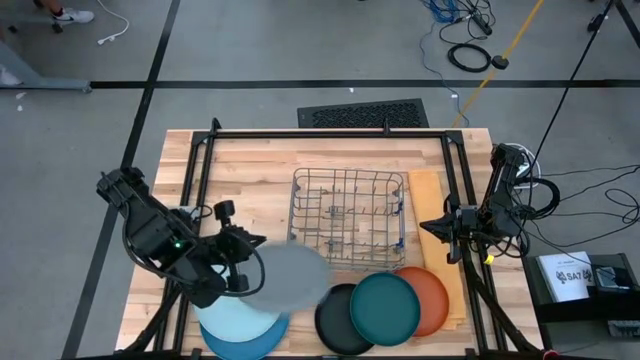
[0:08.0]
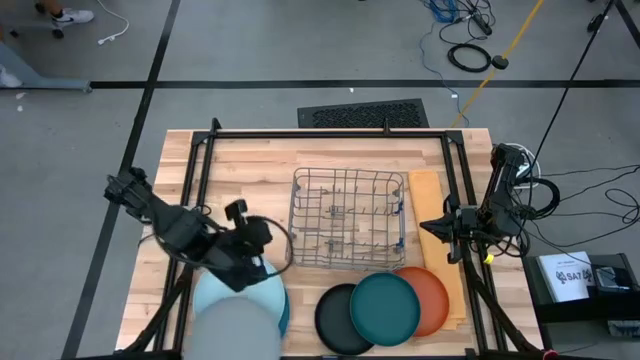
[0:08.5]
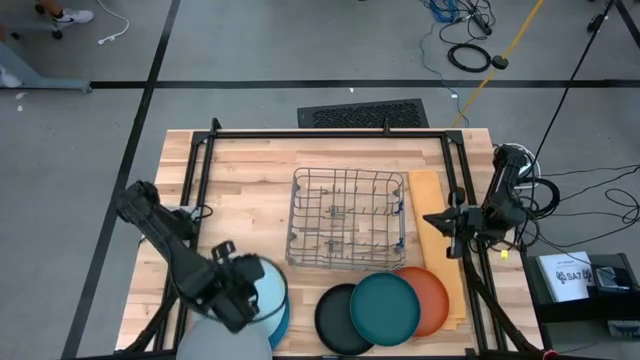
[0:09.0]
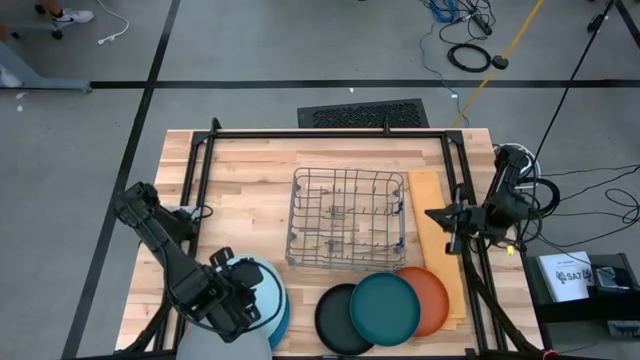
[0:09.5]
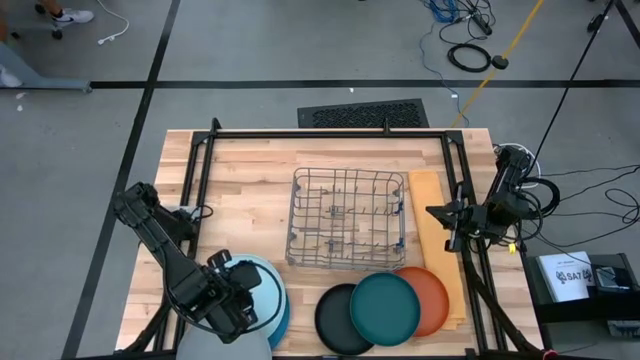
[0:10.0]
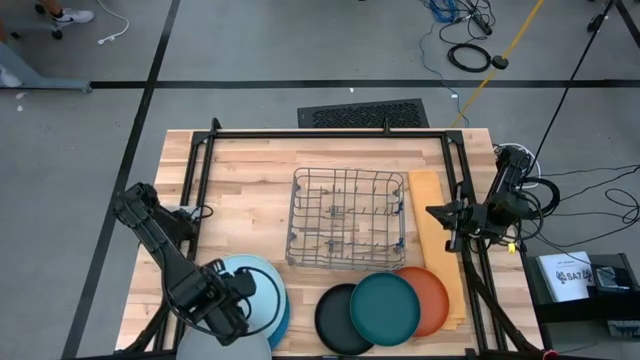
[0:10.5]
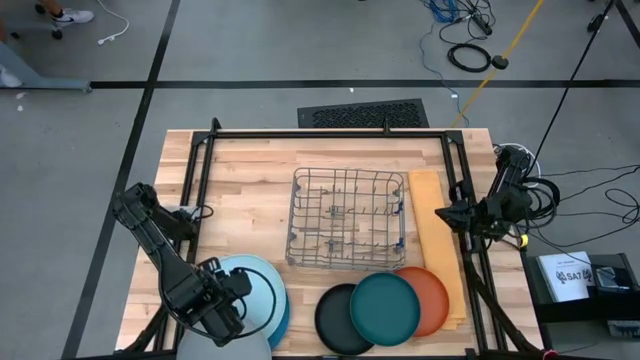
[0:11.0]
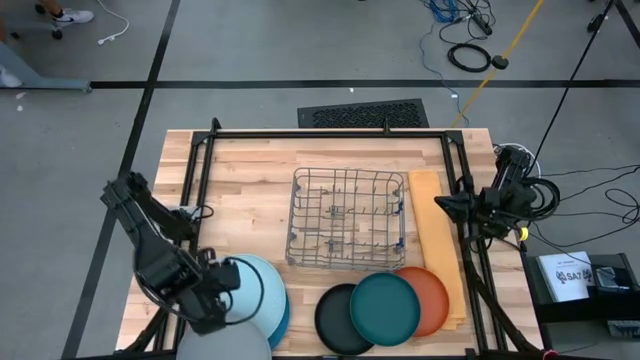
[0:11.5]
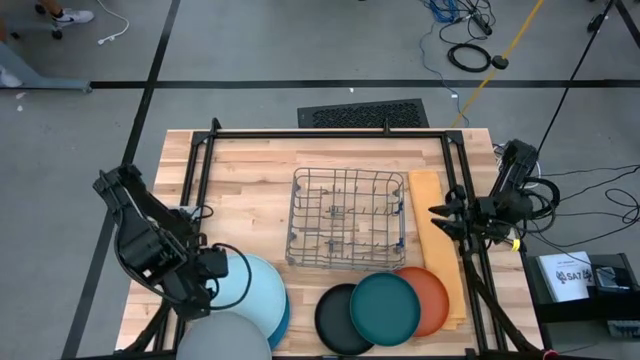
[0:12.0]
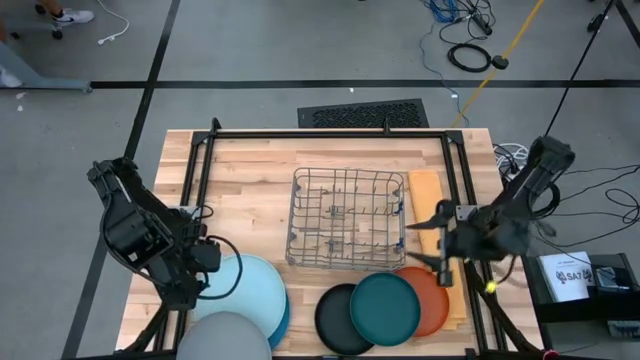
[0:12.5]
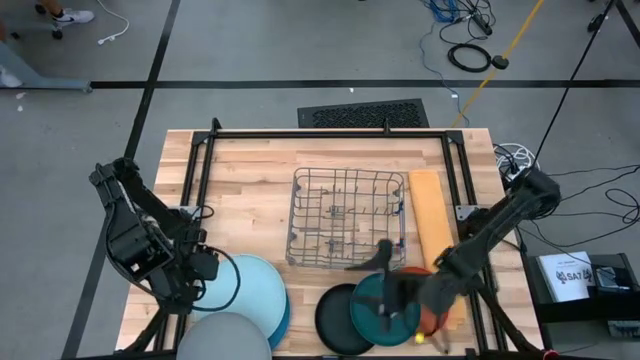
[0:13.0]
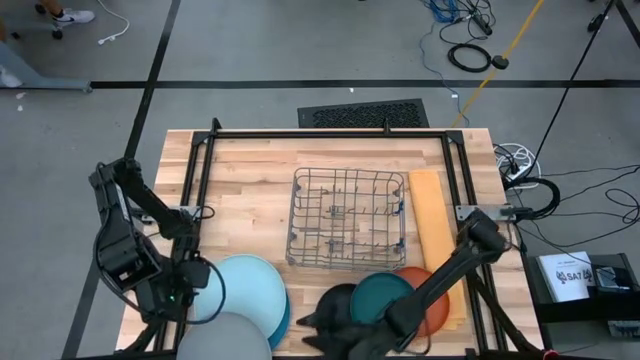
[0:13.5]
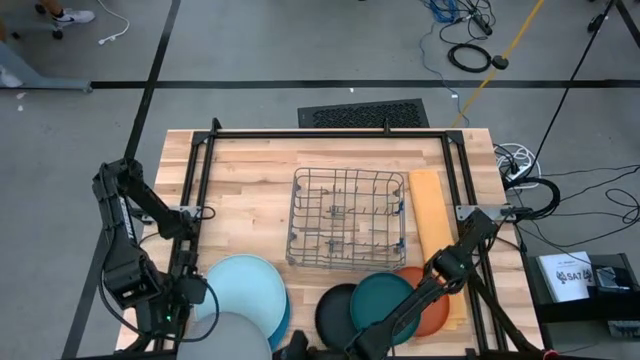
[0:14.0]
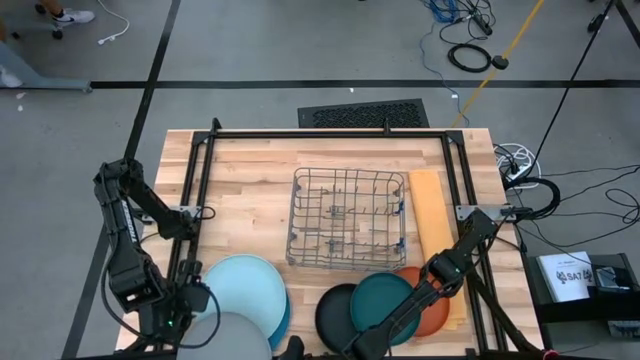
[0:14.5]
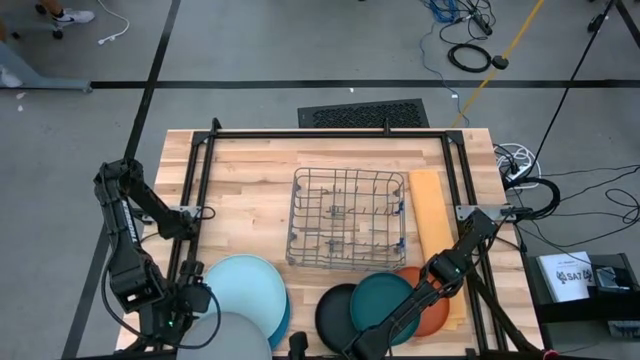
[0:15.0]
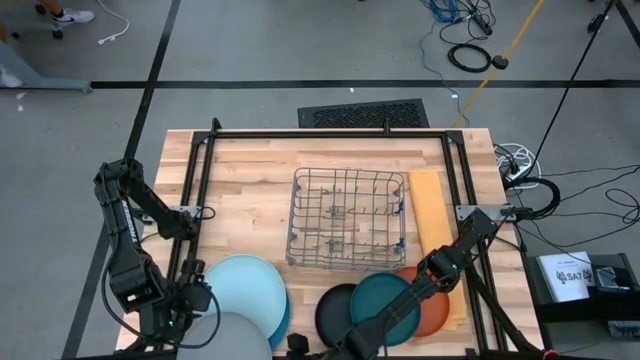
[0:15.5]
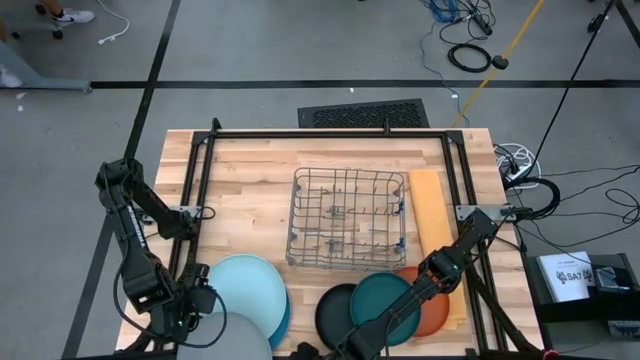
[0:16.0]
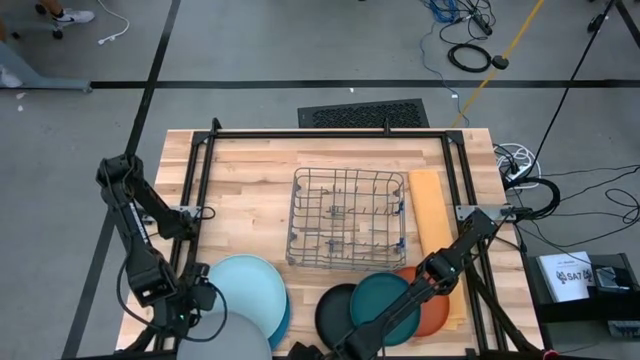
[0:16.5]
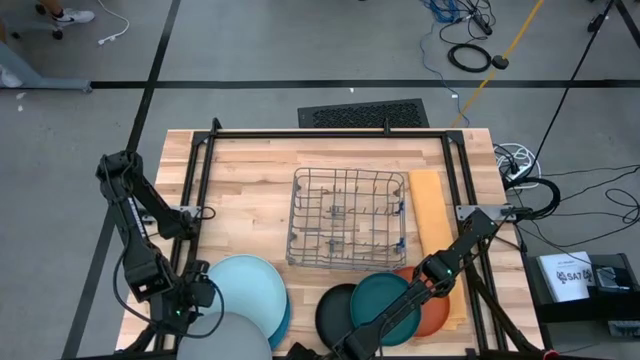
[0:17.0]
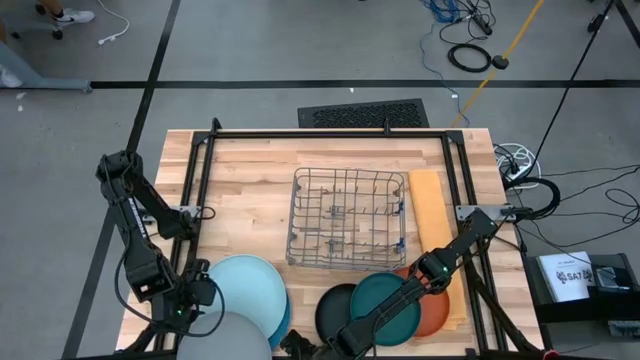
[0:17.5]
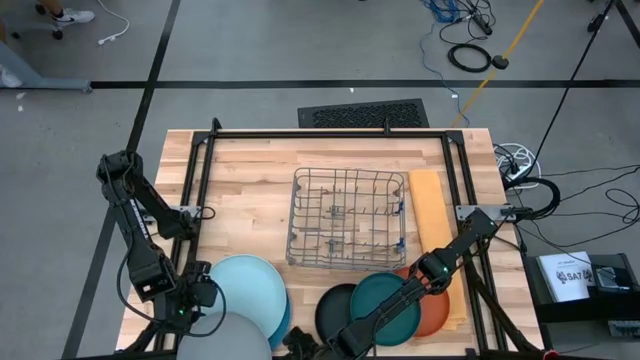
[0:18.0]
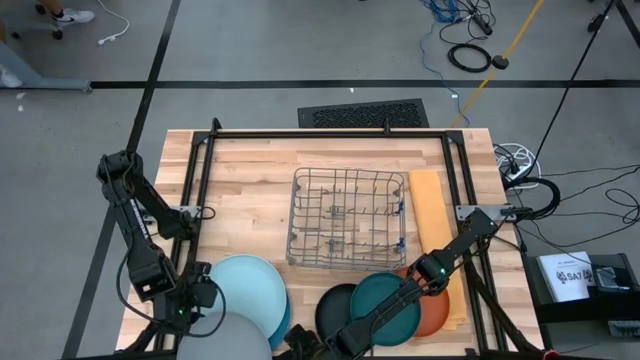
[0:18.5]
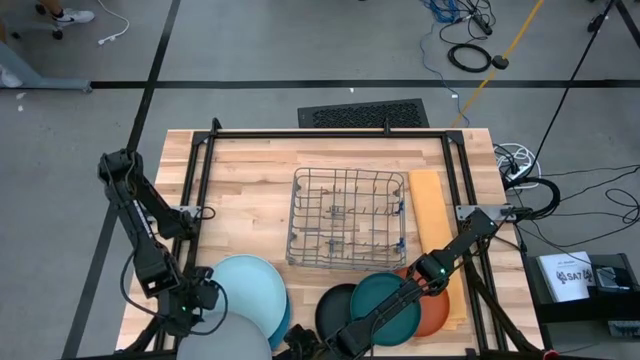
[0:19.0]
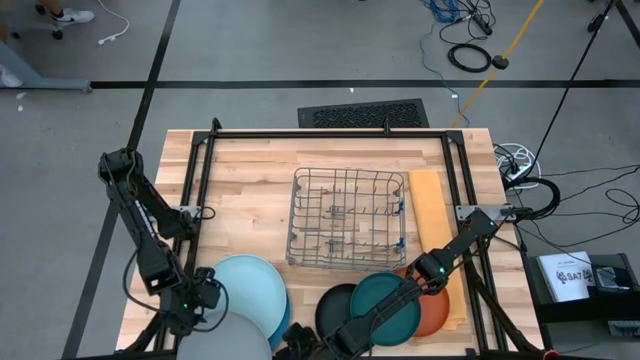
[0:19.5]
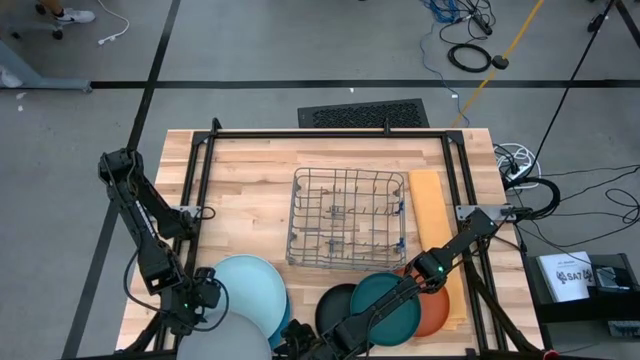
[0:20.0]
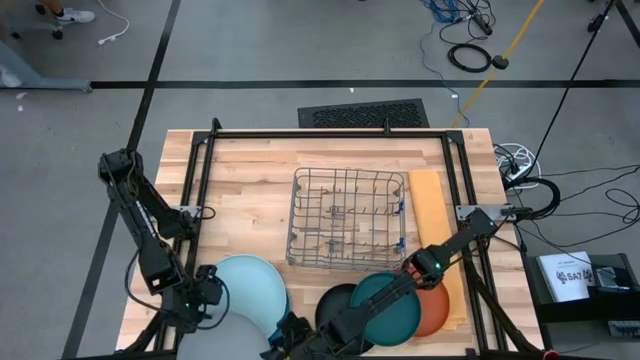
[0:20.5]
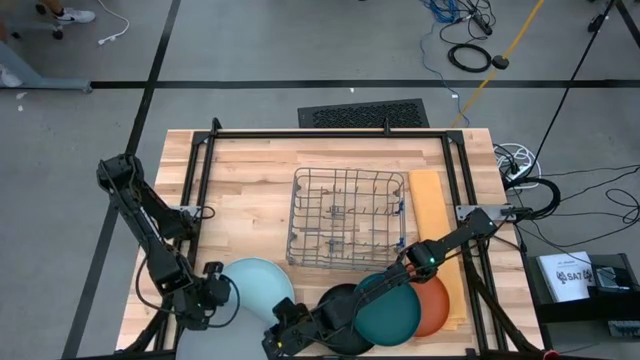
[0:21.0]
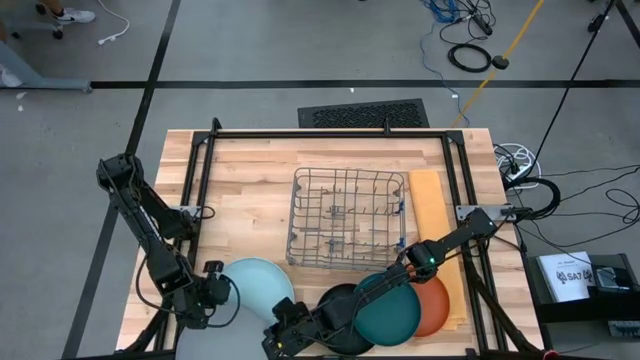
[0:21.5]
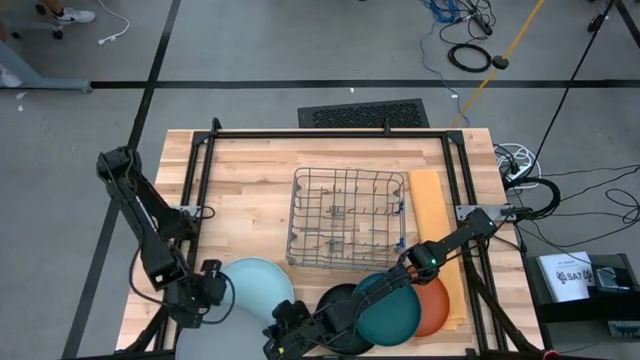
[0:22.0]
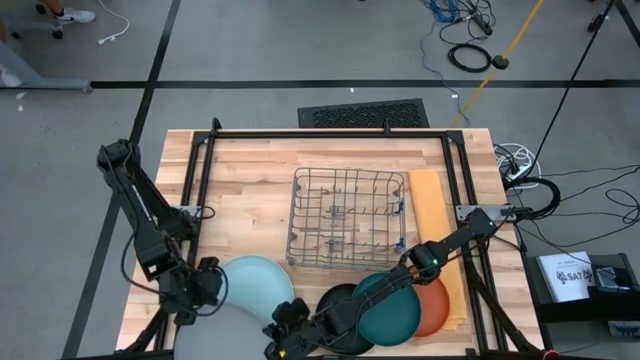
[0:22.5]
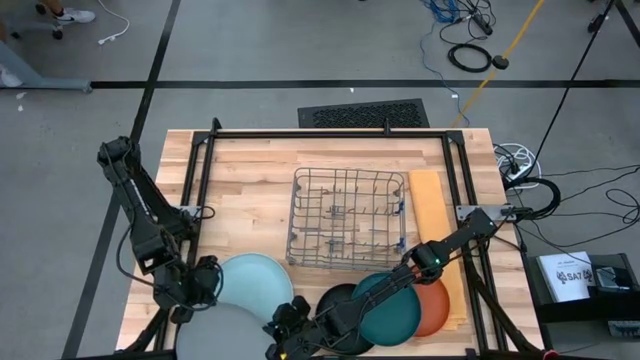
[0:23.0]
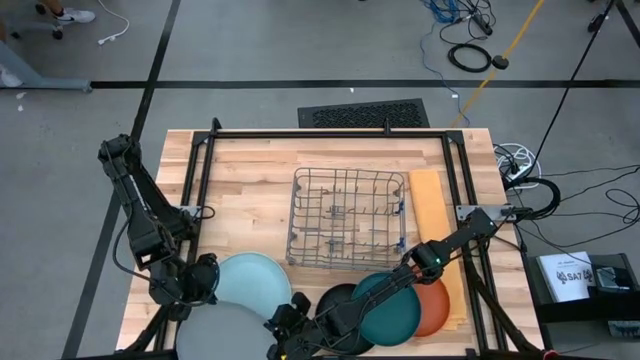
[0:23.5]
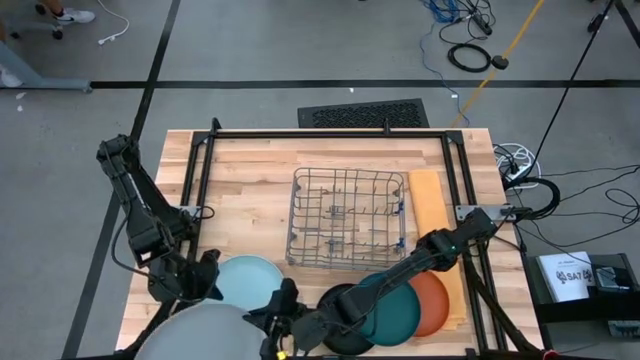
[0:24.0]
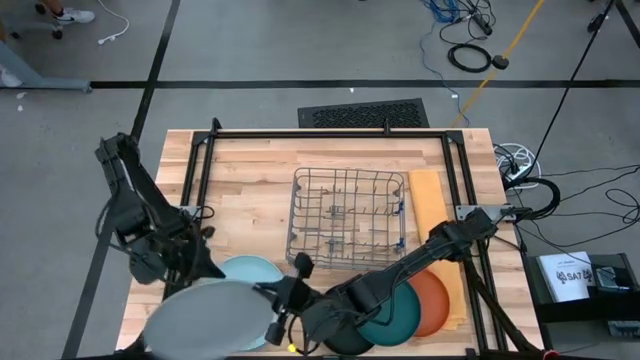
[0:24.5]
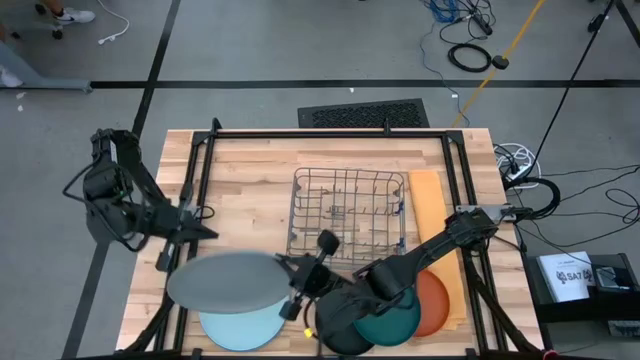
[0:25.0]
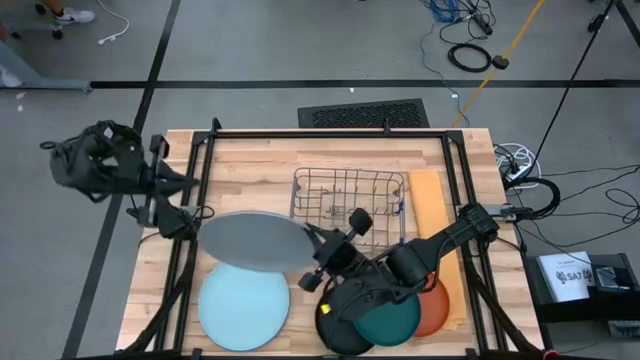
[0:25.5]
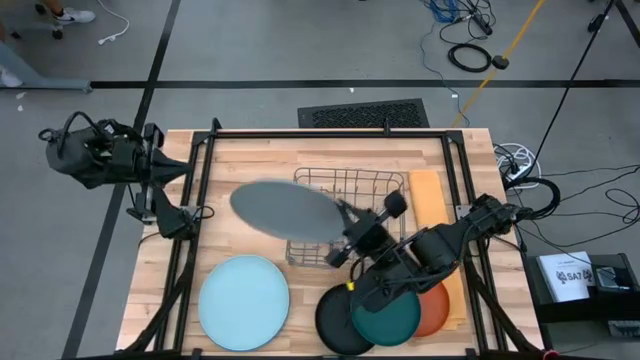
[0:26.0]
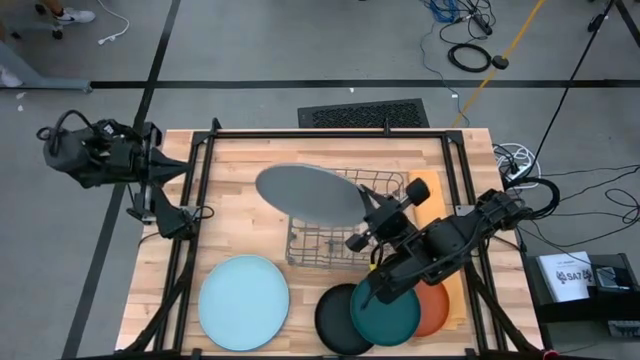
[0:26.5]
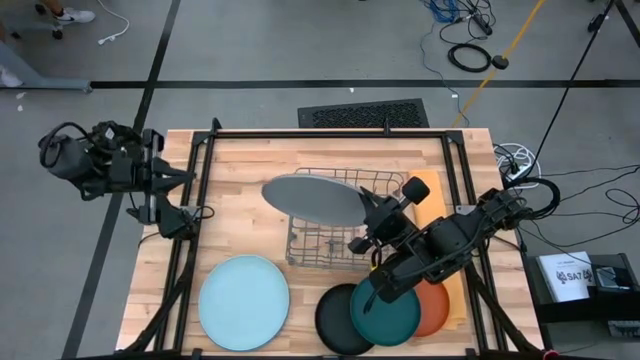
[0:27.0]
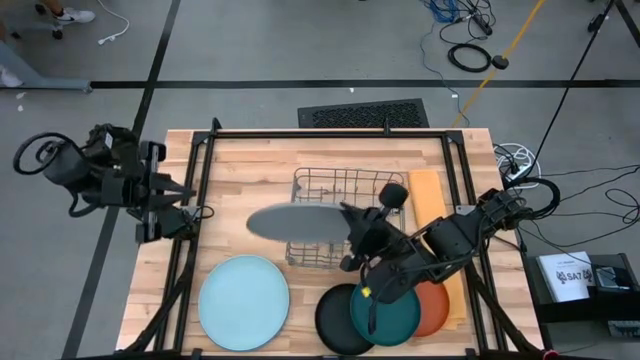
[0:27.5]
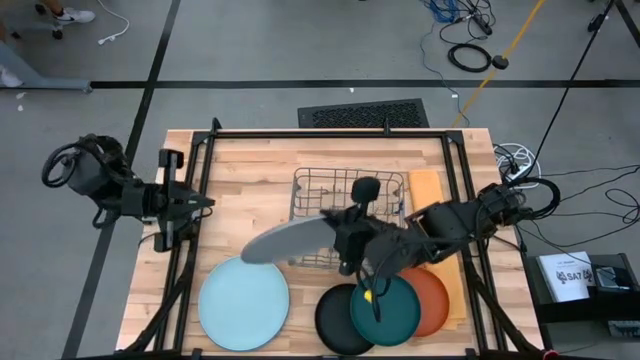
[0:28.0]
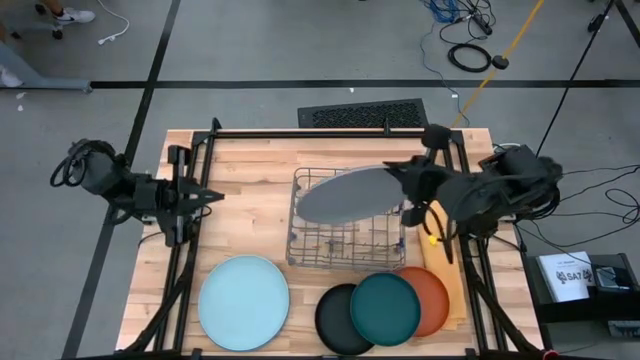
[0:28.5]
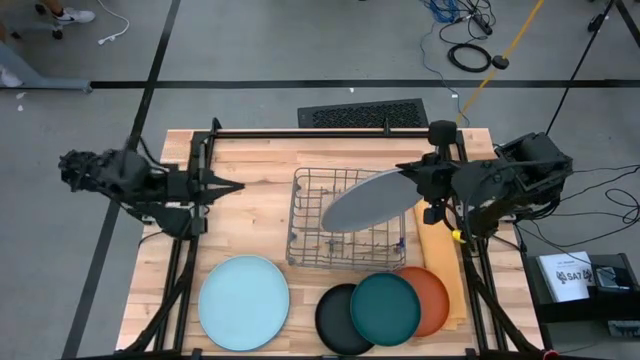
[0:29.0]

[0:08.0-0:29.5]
Task: Sort dishes
Put the gray plate into the dish rack
